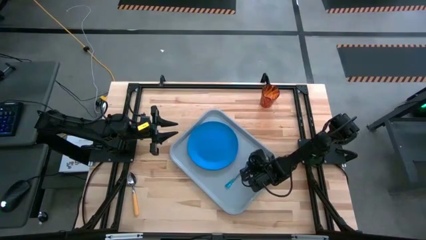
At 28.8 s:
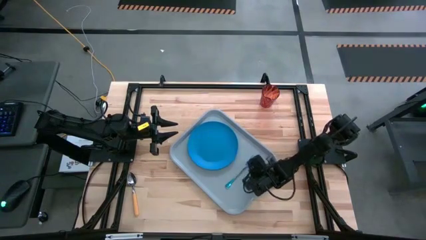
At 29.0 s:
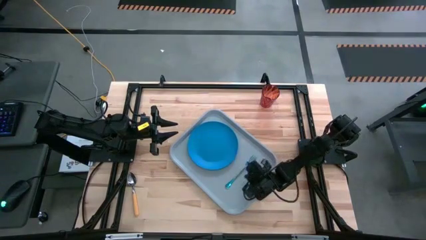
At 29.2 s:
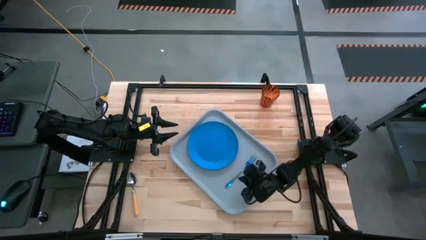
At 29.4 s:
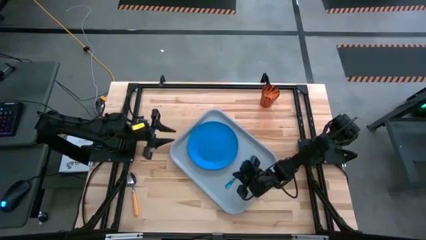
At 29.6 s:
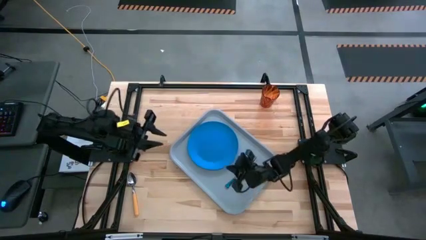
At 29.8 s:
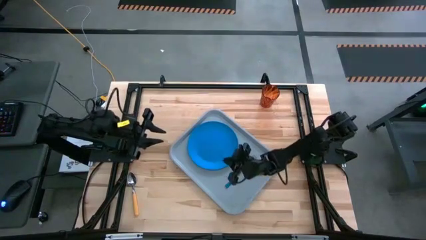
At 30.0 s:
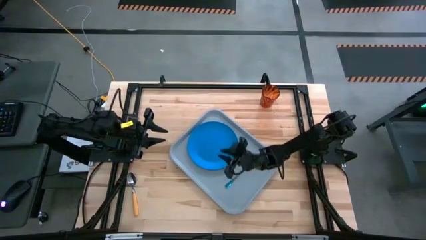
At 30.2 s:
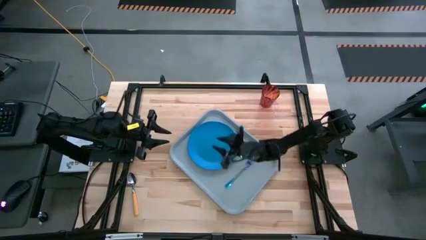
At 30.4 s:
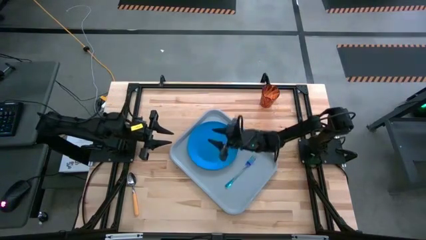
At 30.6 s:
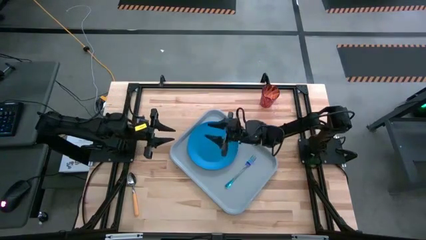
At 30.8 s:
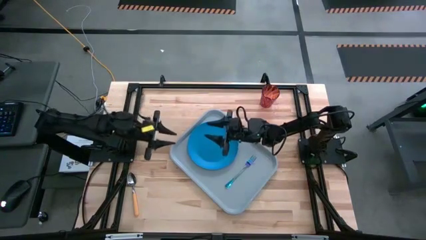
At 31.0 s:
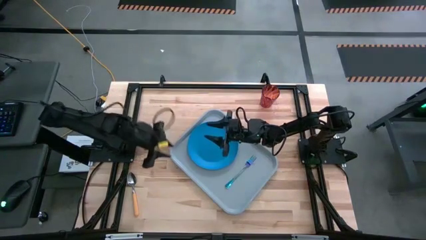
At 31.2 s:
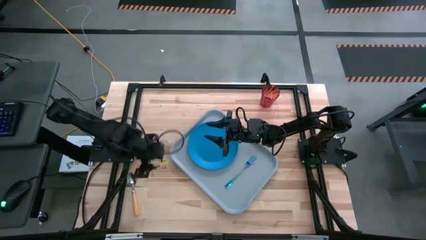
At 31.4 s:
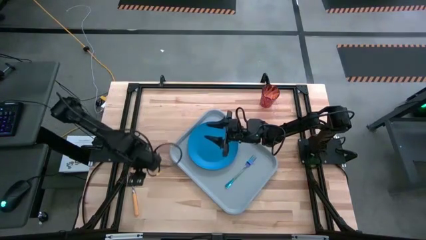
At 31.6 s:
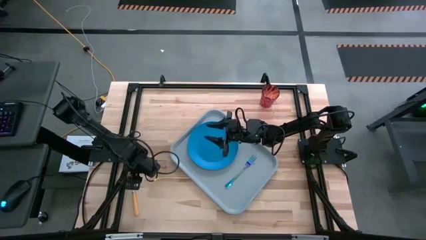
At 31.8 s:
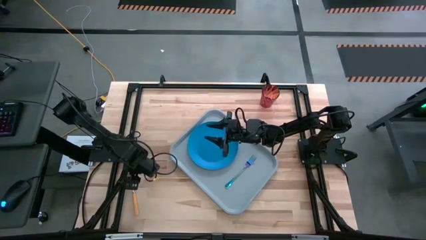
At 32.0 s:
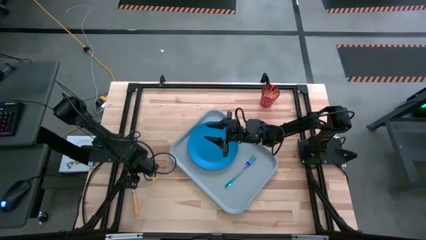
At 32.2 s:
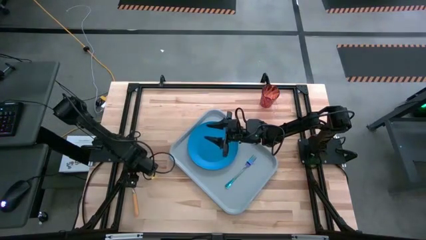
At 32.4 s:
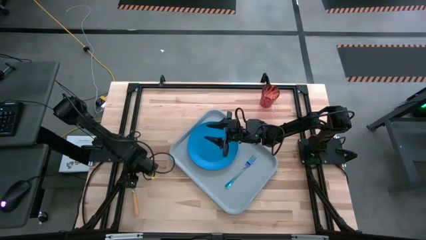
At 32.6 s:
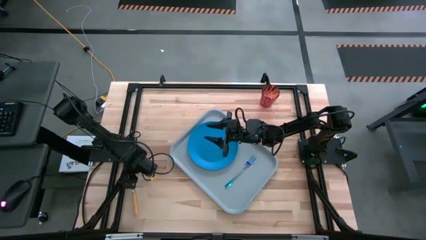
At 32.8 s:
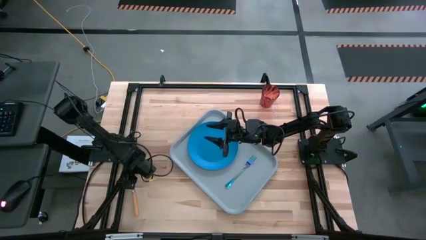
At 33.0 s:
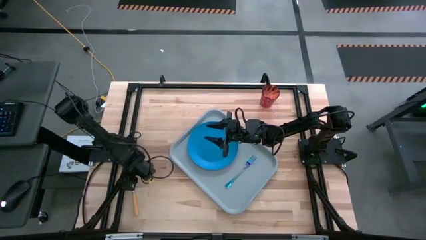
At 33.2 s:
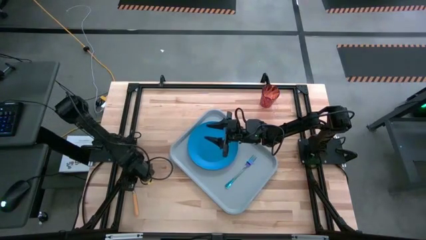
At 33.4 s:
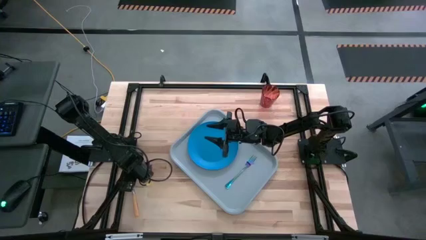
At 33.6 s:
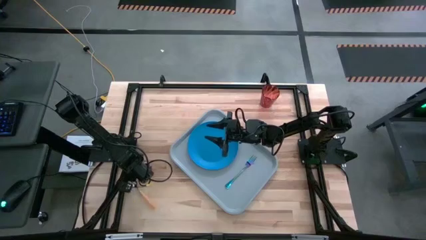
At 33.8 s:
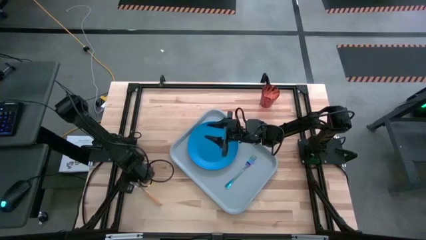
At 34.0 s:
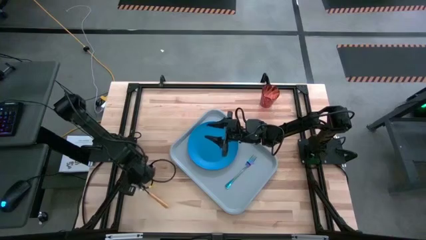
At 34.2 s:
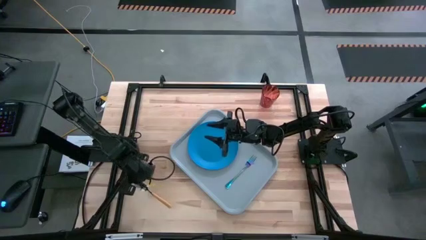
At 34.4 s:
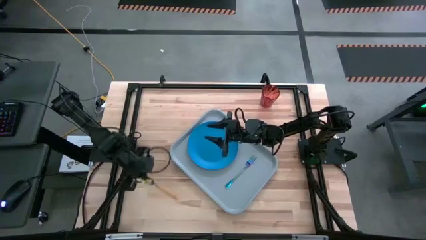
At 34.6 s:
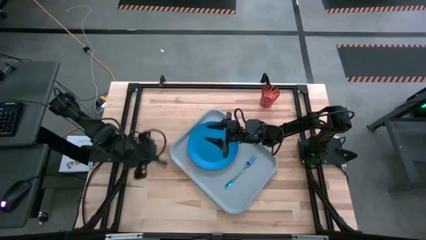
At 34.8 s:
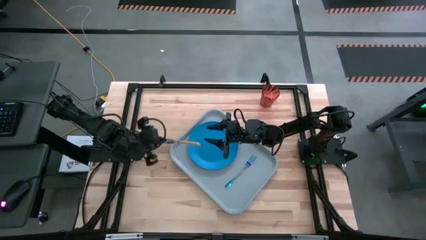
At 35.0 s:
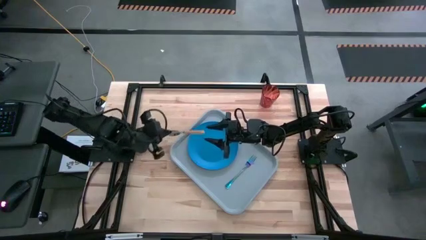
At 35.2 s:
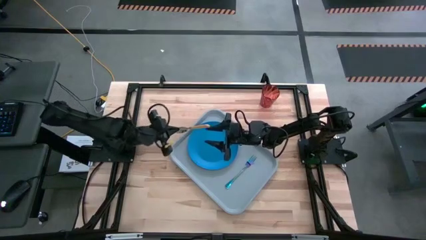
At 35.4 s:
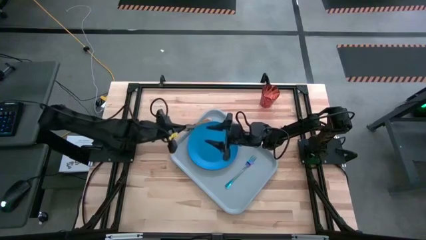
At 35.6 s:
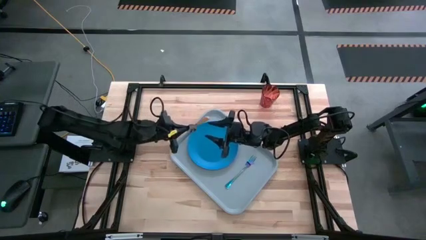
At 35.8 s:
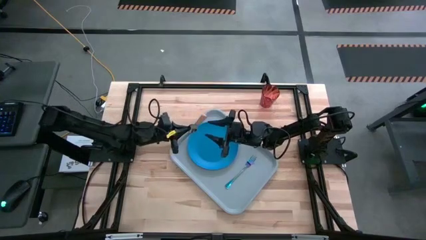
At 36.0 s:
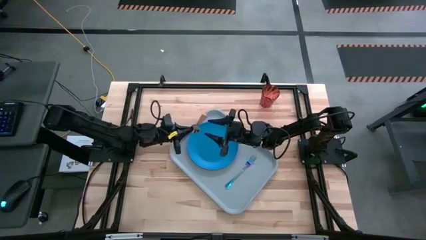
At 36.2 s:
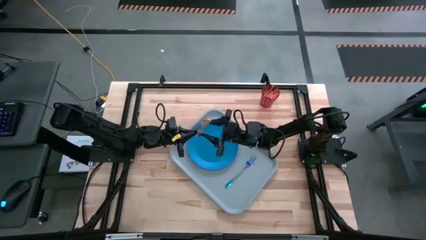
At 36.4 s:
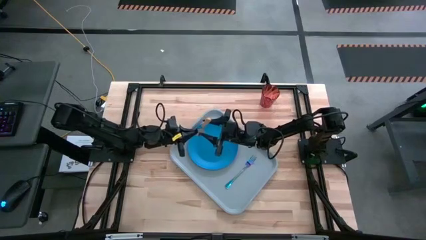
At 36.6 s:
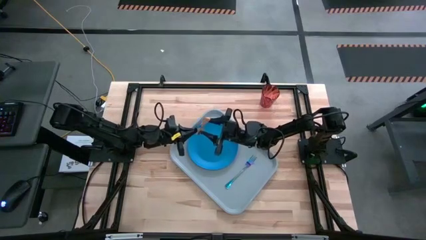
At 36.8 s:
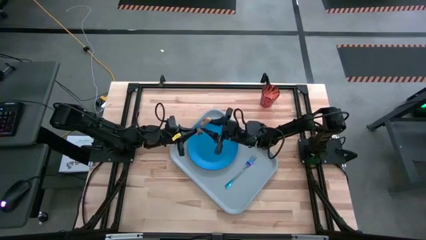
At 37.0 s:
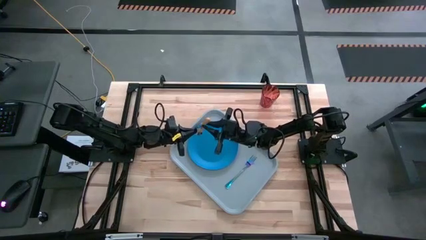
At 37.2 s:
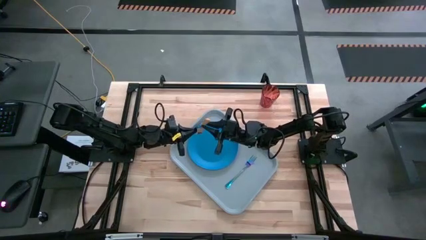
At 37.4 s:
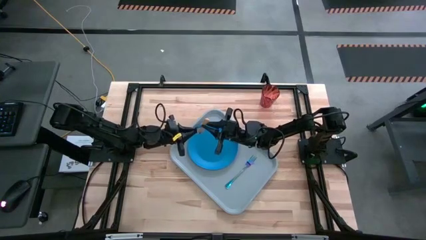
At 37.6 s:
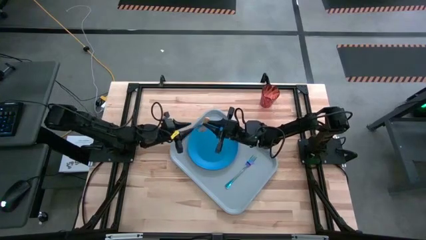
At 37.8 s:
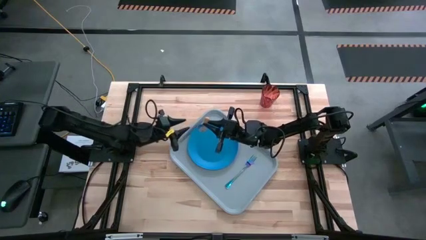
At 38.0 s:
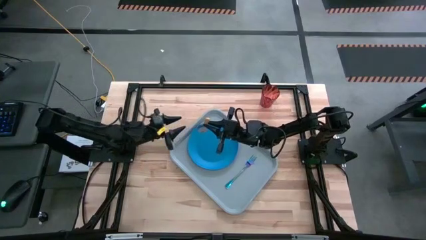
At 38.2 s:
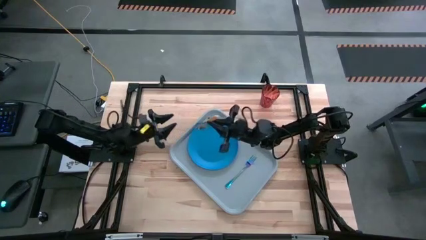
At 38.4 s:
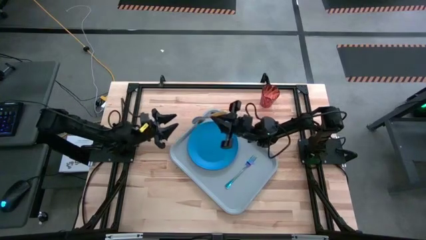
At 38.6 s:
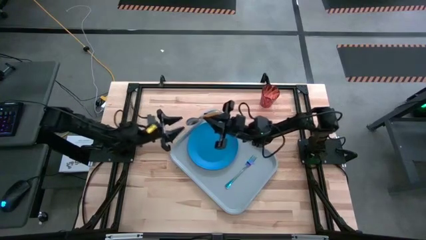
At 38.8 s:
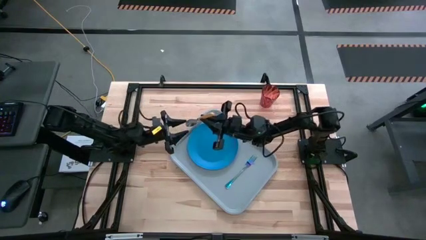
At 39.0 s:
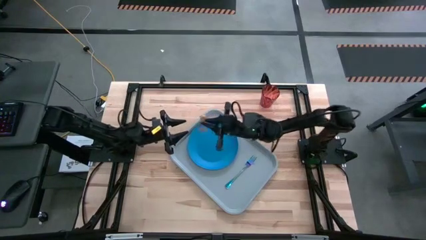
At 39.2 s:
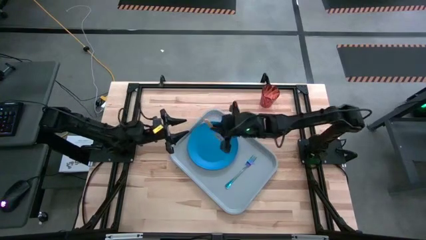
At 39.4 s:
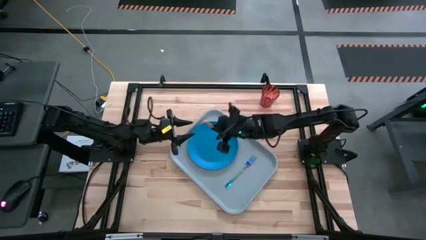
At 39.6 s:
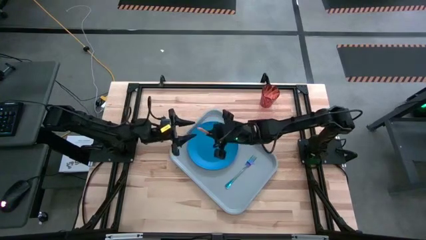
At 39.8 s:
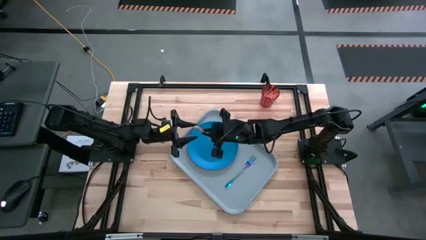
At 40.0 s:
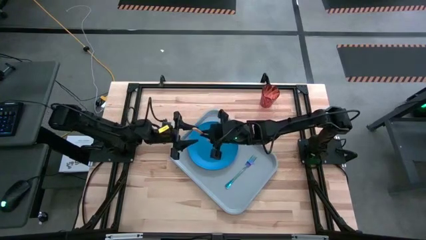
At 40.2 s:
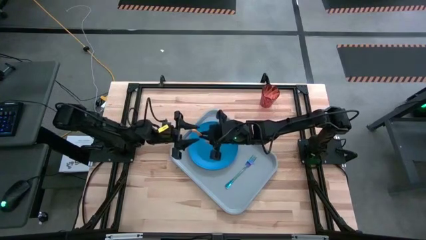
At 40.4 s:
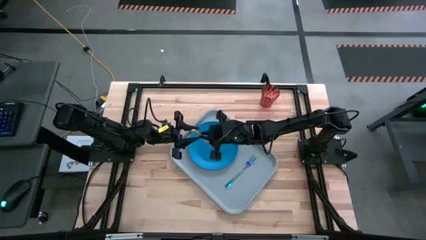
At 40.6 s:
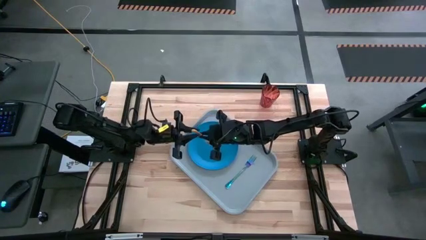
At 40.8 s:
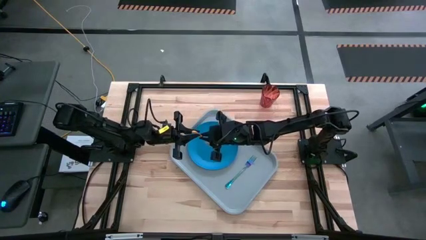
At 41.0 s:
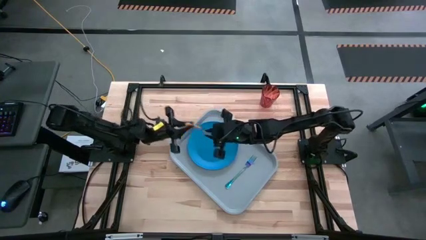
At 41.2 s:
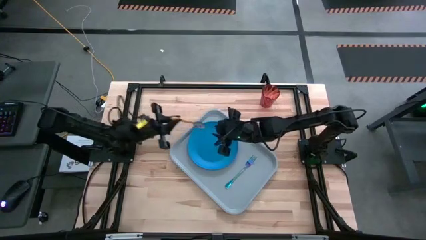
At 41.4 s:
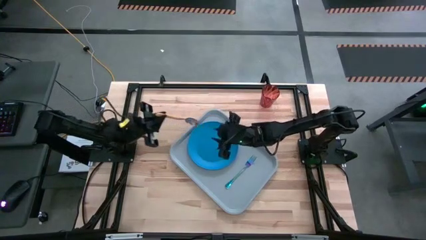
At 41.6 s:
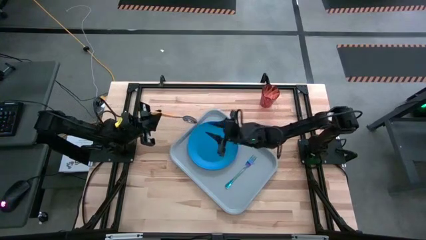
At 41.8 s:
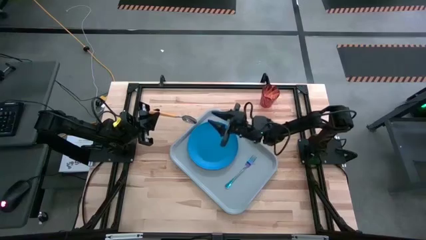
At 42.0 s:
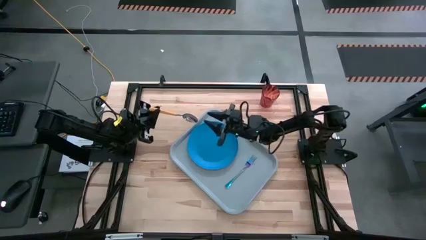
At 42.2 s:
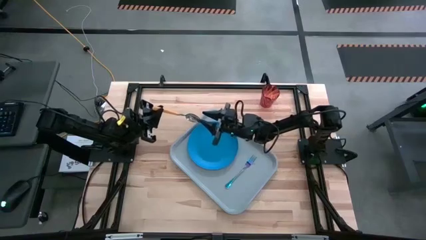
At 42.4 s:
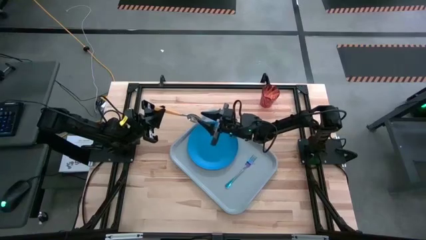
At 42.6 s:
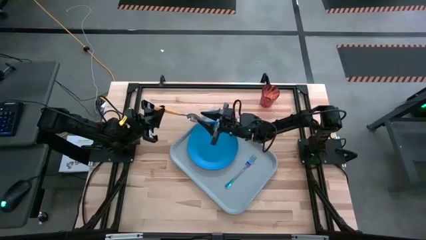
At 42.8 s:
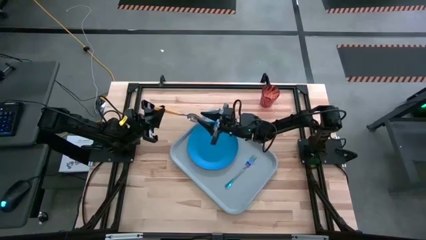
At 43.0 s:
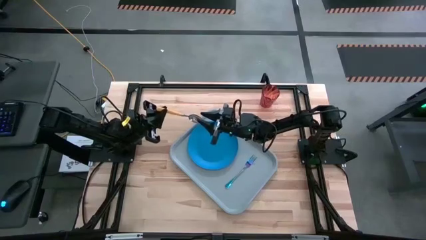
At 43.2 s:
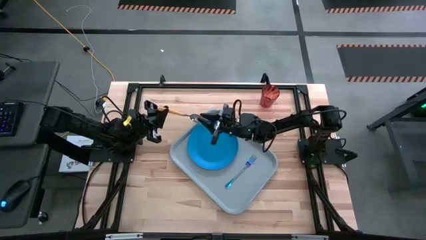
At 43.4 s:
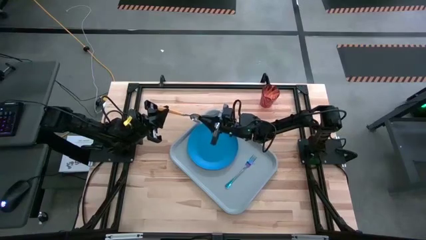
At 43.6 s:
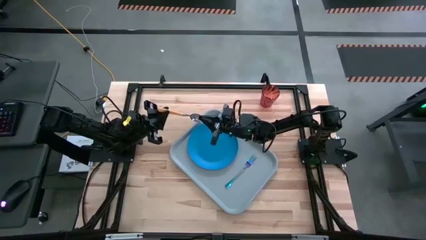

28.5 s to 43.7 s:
Task: Pick and place plate/cup/fork/spoon on tray
Put the yellow spoon on the right side of the gray serving tray
